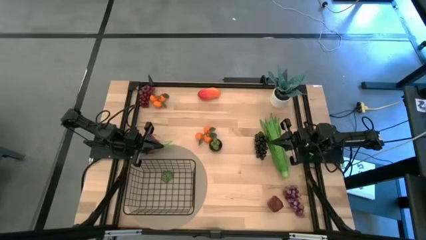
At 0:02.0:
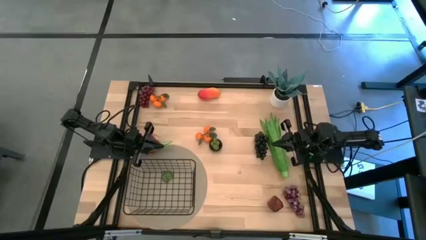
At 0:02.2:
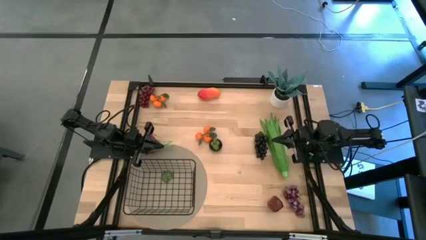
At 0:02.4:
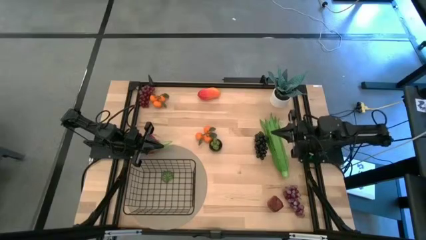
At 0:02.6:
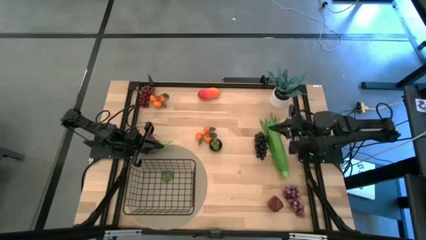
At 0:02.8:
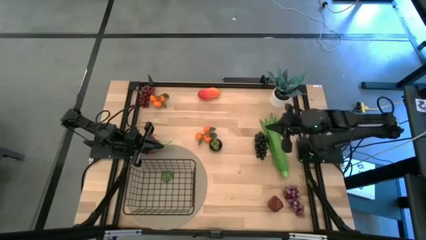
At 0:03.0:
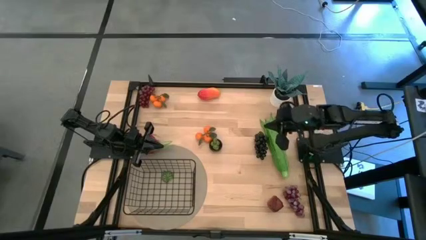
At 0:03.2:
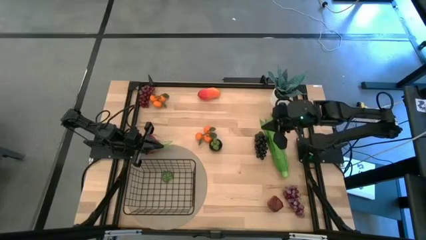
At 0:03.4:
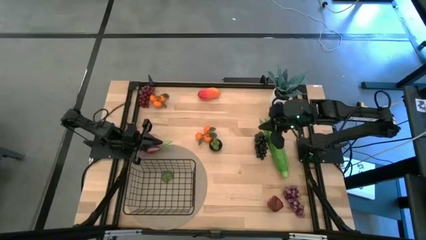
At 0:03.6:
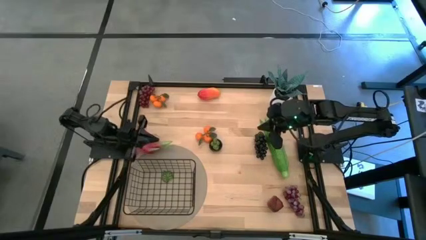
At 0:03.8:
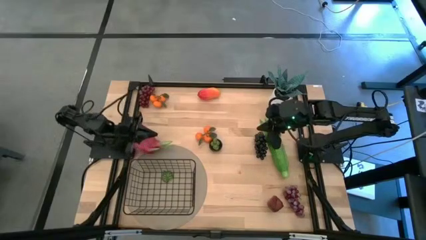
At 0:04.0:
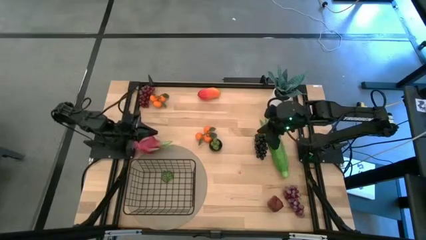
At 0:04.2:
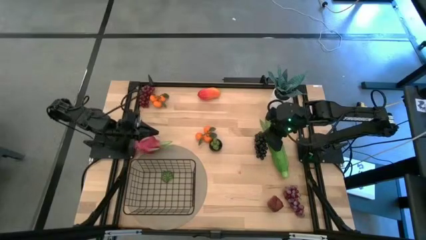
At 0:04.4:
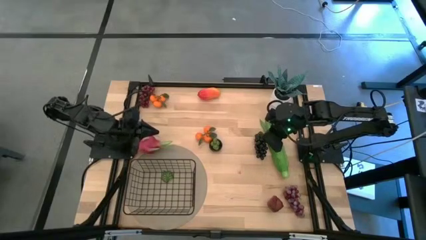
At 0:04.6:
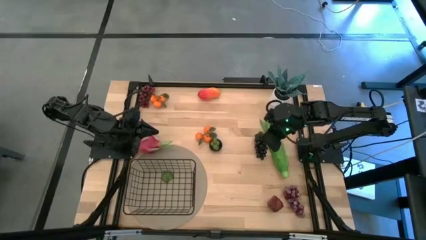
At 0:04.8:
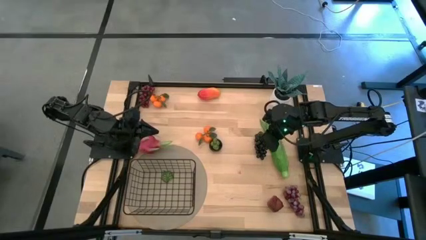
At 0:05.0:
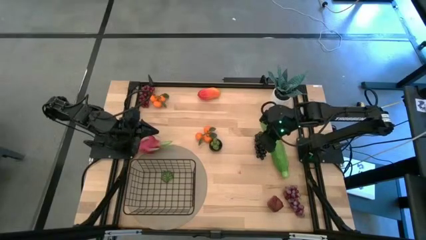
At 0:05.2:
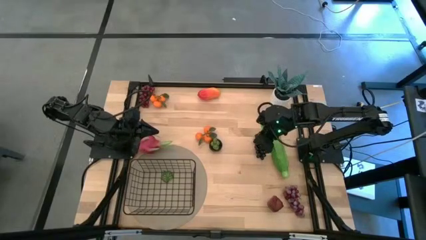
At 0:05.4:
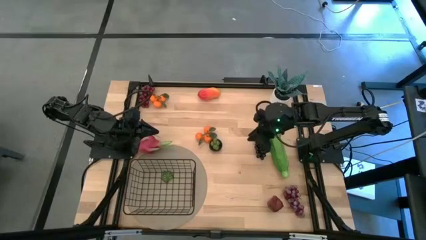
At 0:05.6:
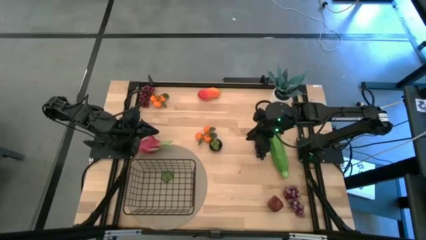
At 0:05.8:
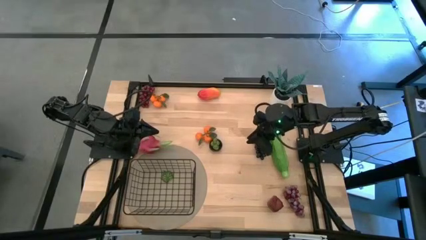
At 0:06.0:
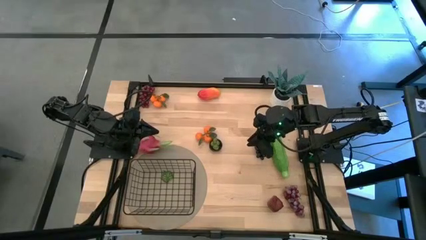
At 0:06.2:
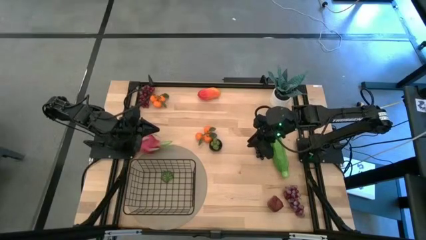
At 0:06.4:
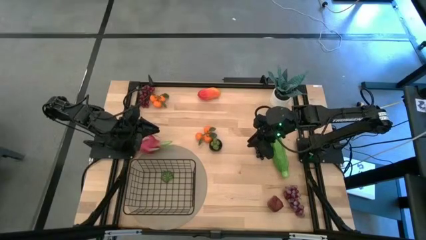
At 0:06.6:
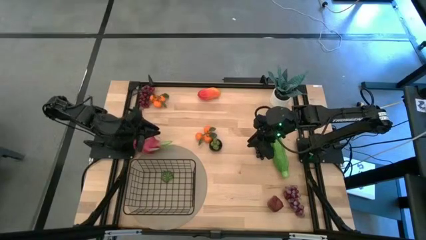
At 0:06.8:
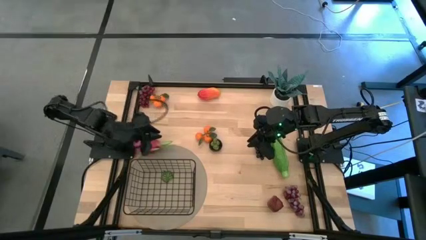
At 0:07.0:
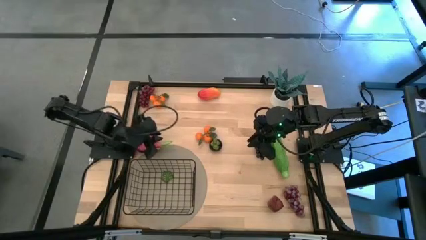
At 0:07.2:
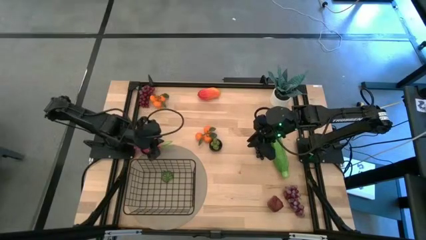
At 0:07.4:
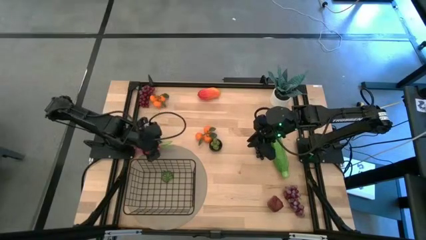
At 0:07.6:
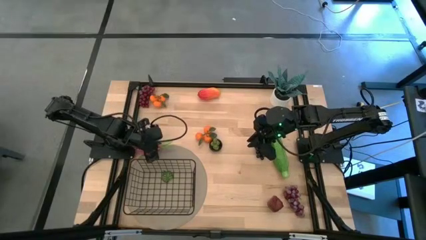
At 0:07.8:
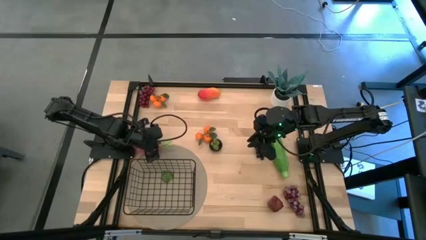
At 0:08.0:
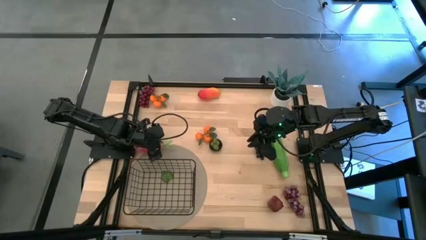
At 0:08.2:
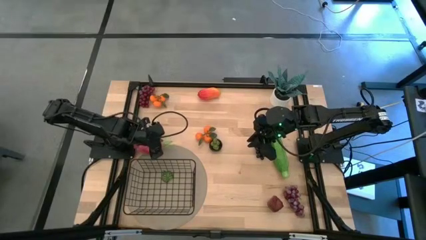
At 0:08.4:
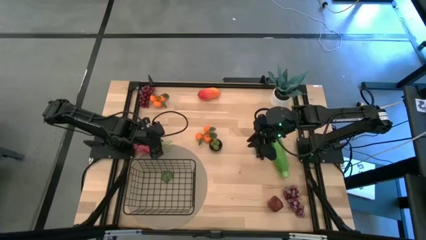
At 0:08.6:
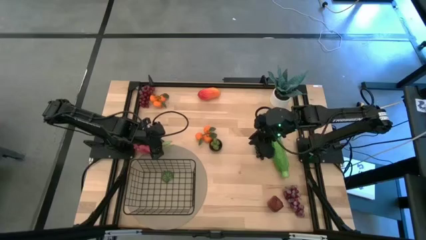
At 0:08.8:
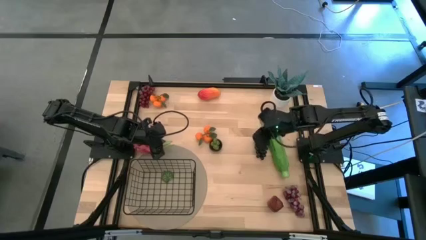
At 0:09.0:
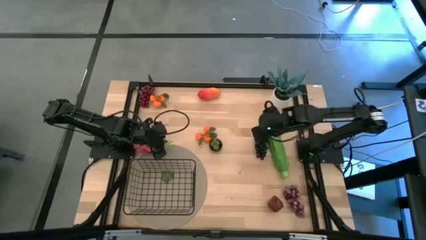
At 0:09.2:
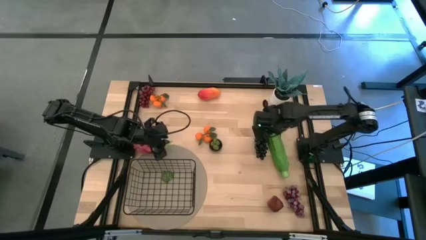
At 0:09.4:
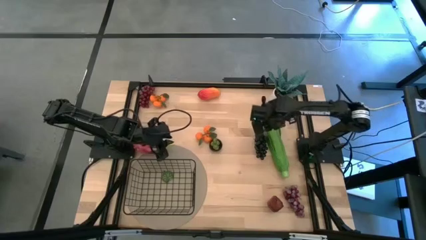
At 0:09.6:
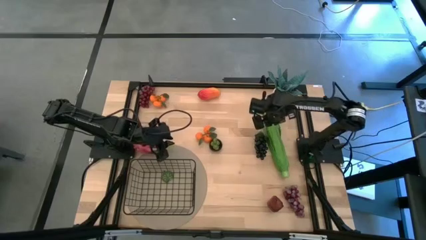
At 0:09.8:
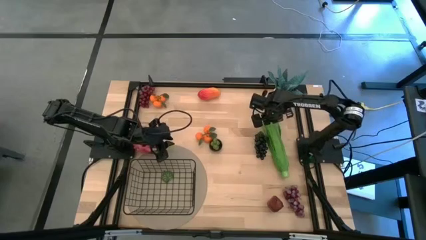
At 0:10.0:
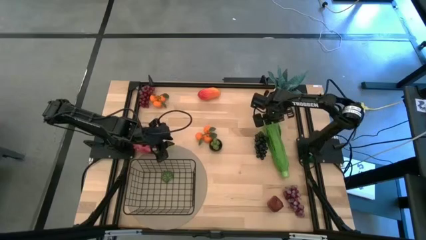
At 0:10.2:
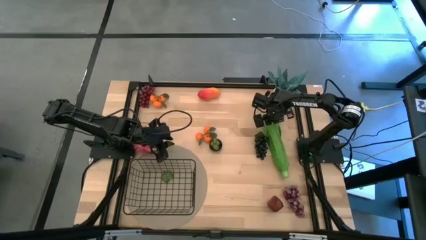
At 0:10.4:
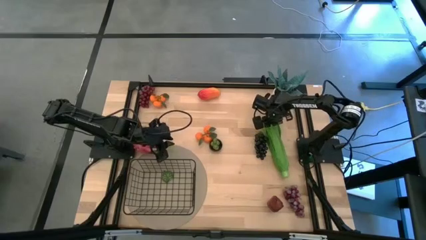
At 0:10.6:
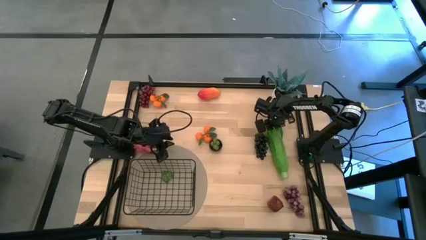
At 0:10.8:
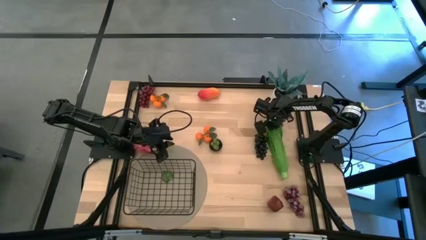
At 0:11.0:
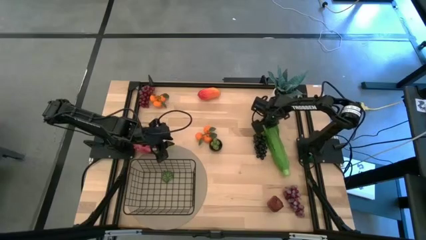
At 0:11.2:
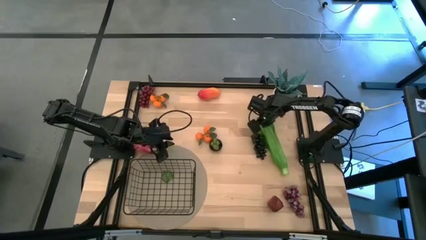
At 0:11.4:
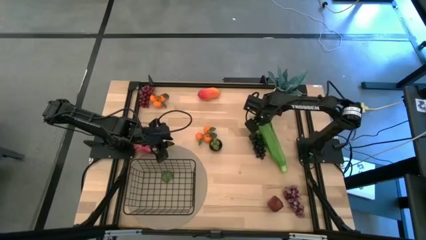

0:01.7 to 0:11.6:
Task: Build produce basket
Put the green lettuce into the black wire basket
